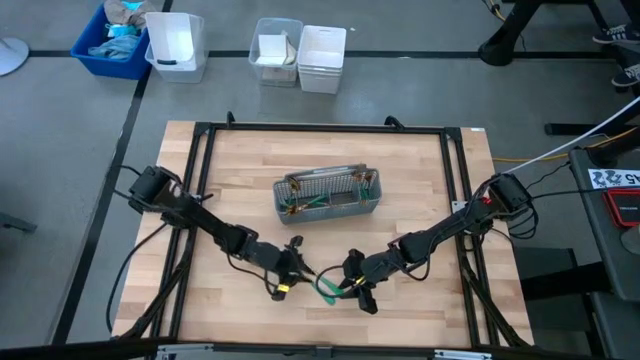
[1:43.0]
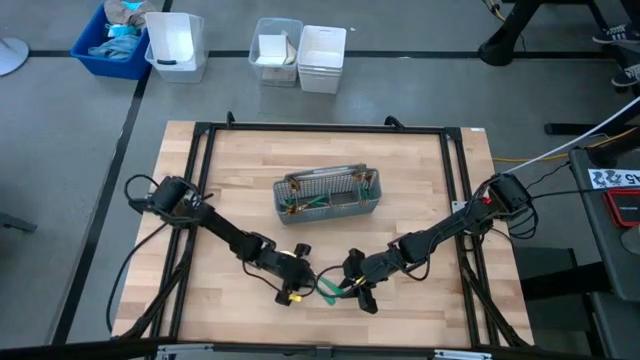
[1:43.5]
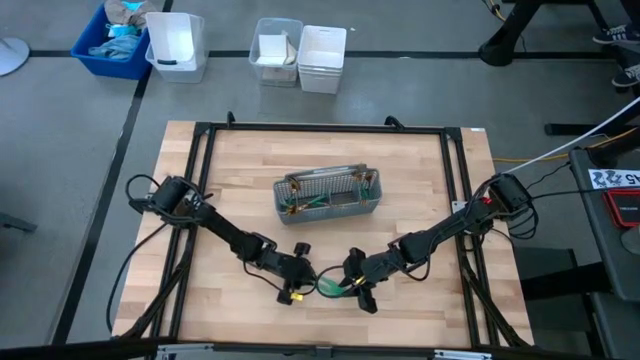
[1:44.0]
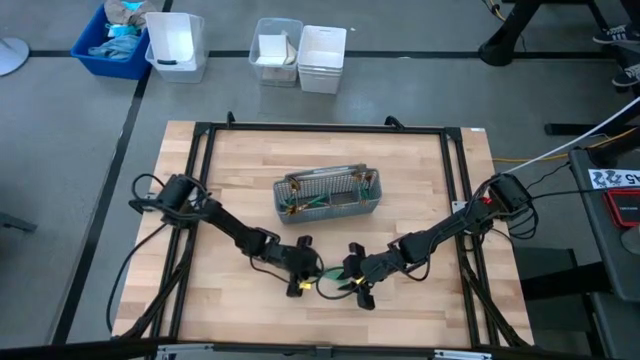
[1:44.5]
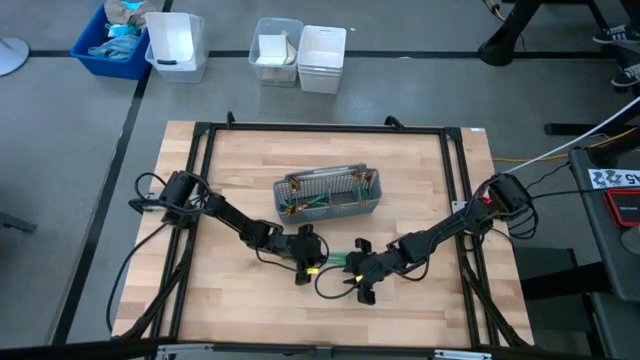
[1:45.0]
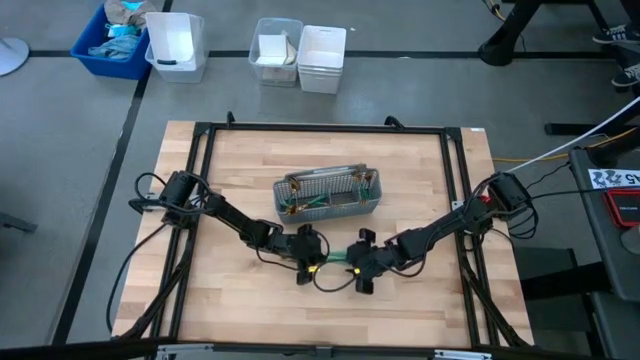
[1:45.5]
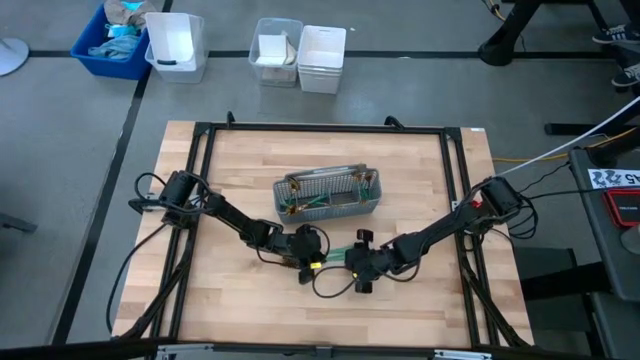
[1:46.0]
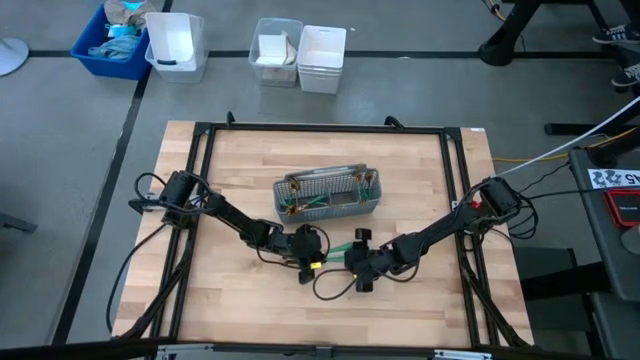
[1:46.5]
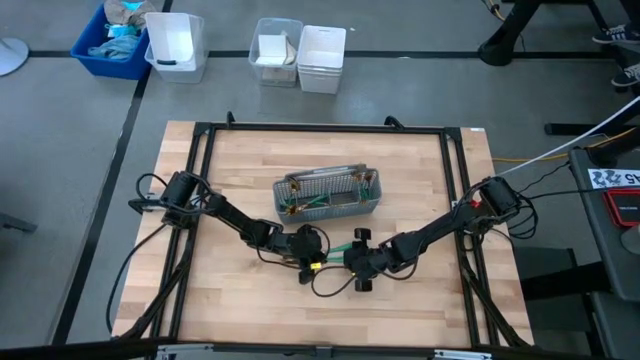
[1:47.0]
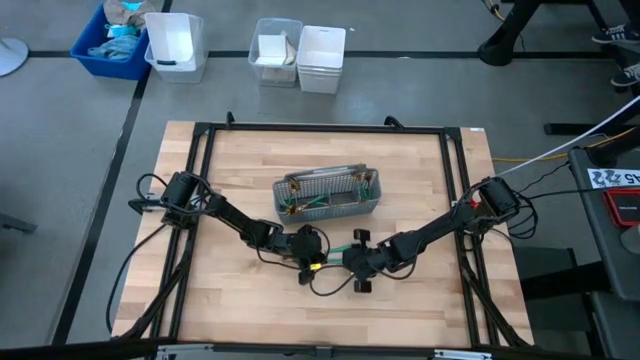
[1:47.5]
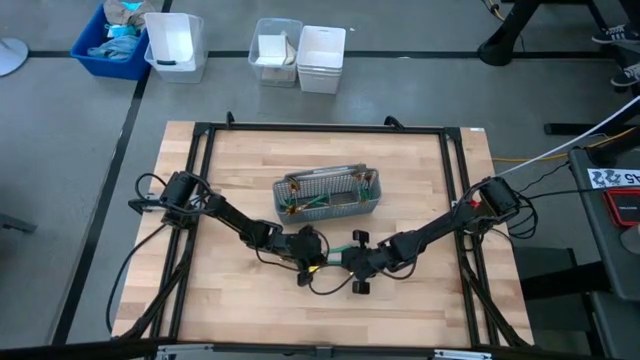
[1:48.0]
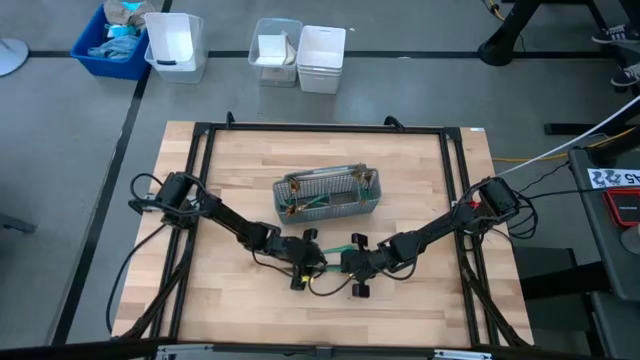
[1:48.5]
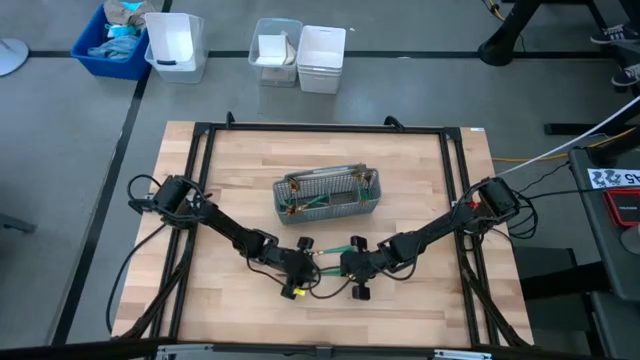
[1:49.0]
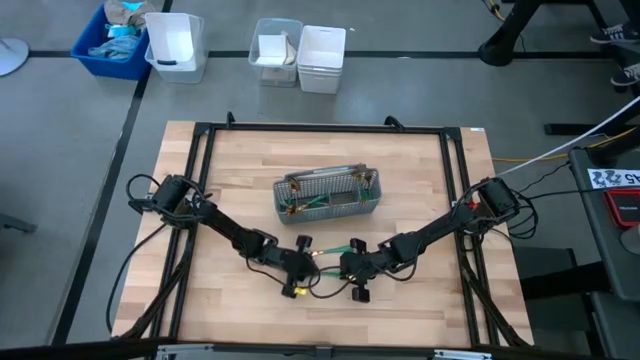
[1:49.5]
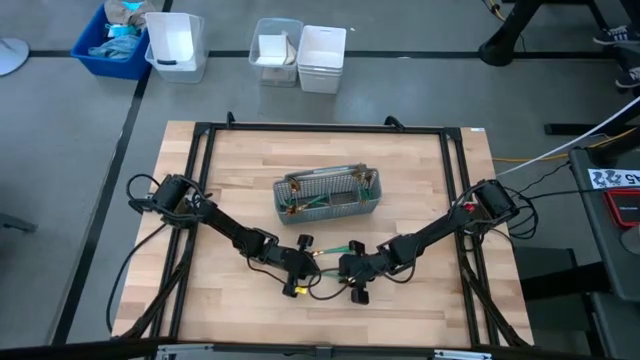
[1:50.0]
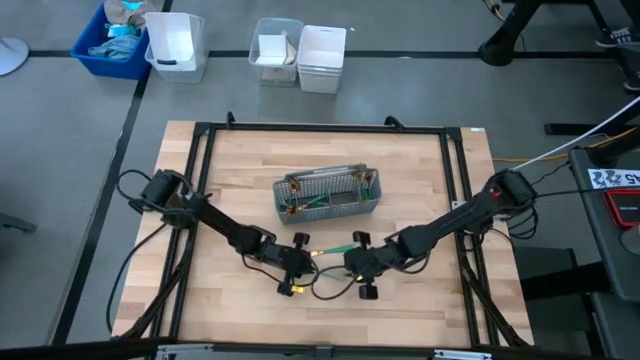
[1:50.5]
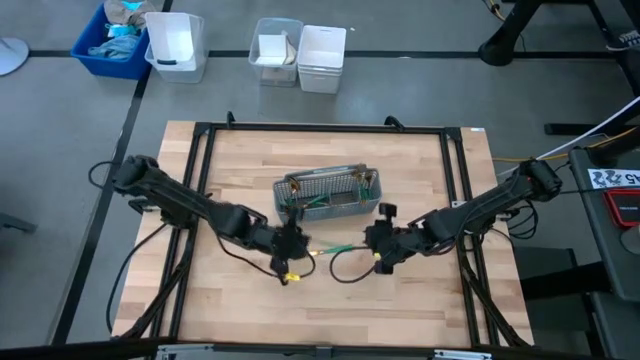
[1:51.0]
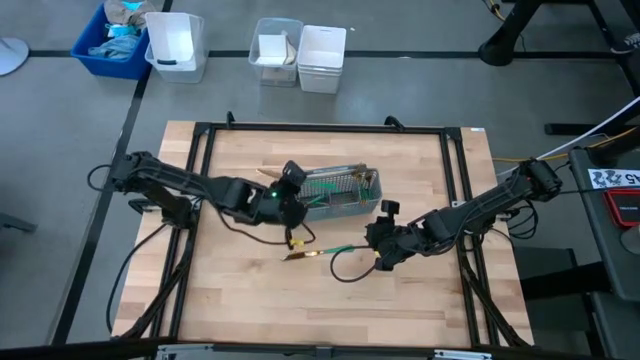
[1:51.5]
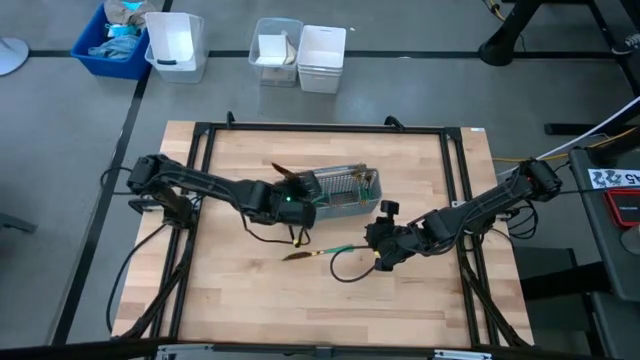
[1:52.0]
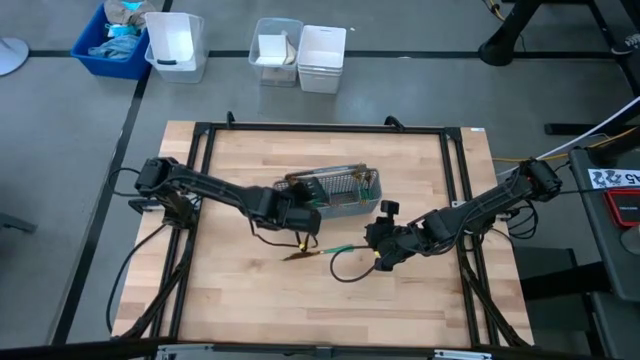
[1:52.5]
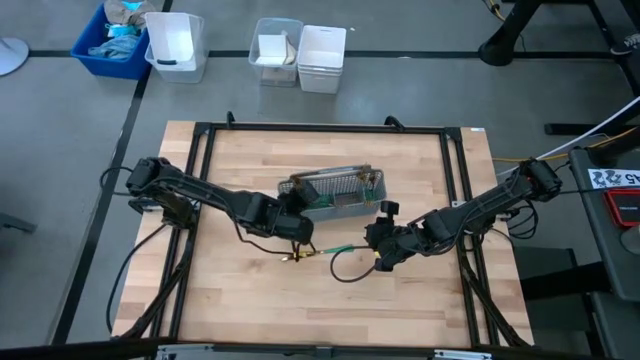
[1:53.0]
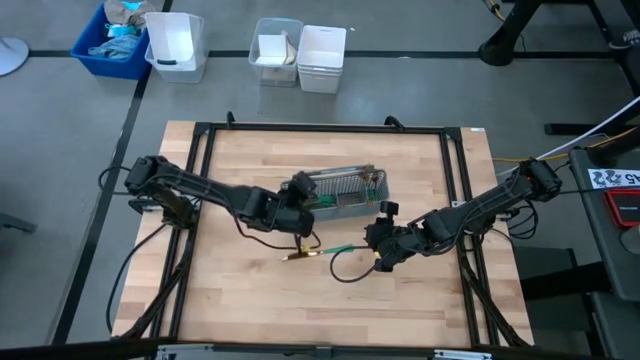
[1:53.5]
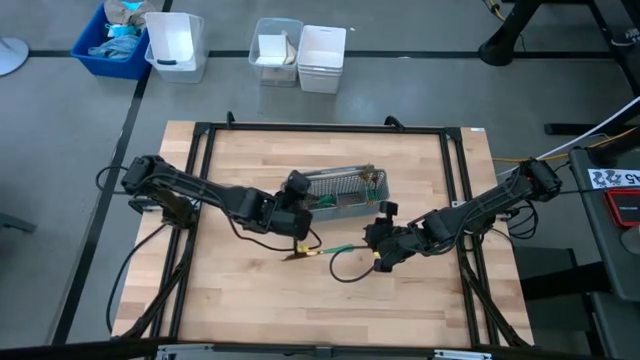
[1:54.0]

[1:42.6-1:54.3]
Task: Sort silverware
Put the green knife in the gray silverware basket

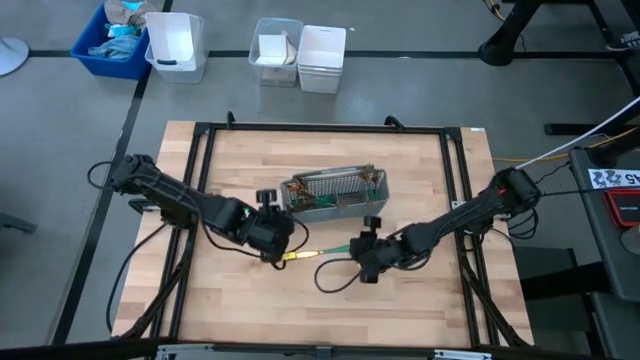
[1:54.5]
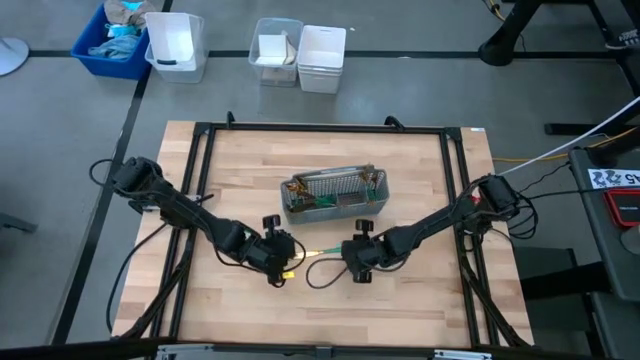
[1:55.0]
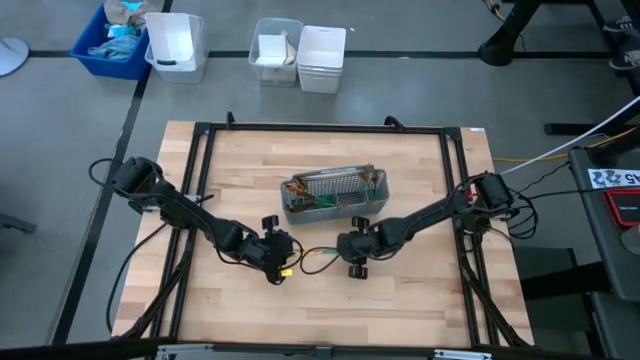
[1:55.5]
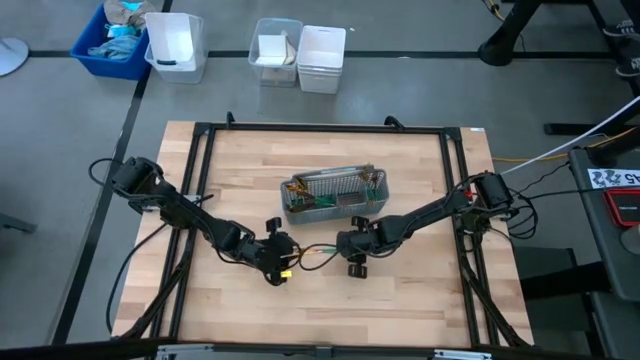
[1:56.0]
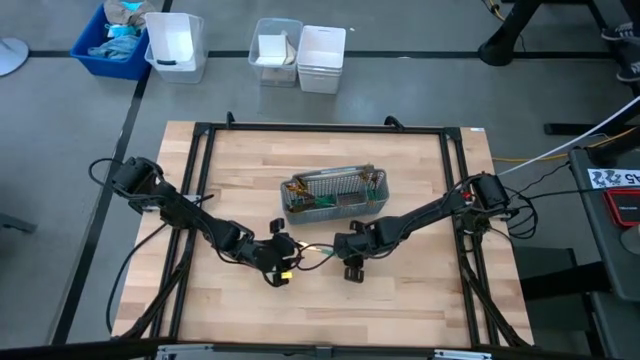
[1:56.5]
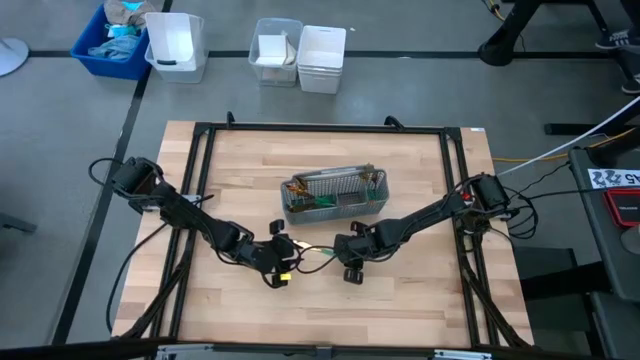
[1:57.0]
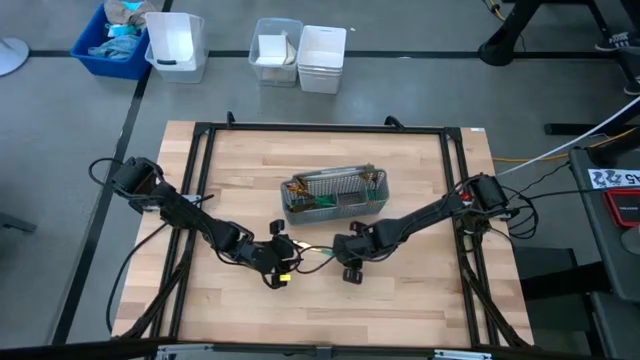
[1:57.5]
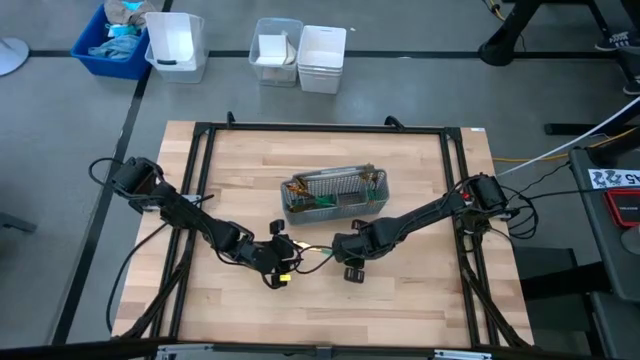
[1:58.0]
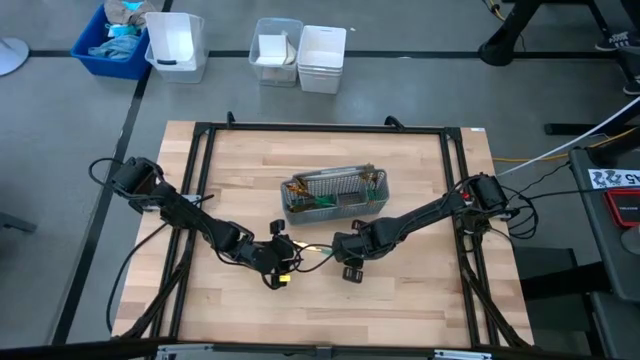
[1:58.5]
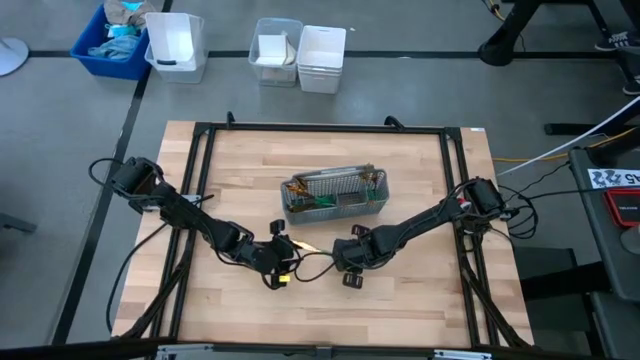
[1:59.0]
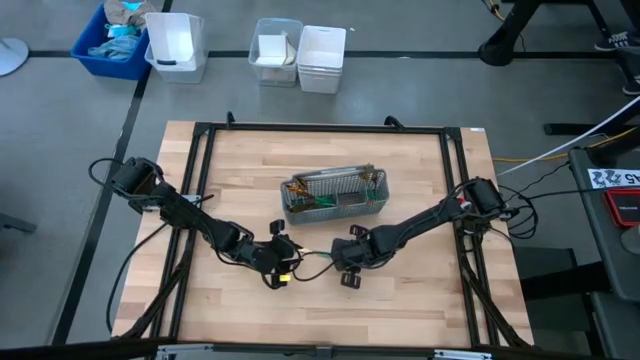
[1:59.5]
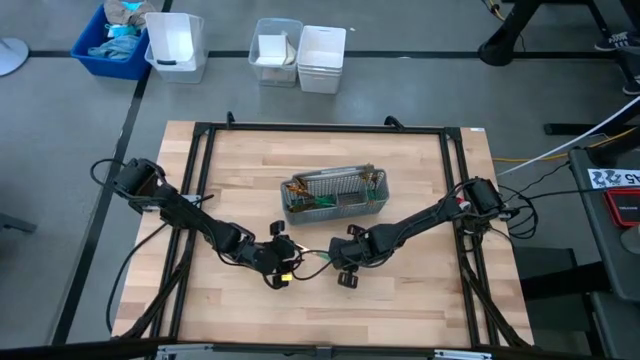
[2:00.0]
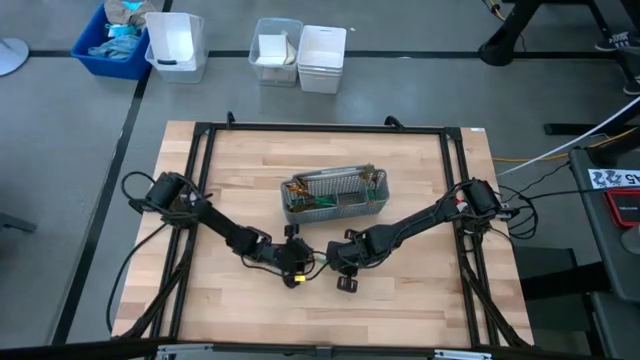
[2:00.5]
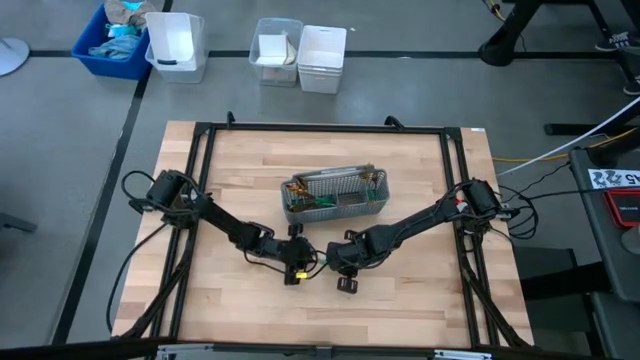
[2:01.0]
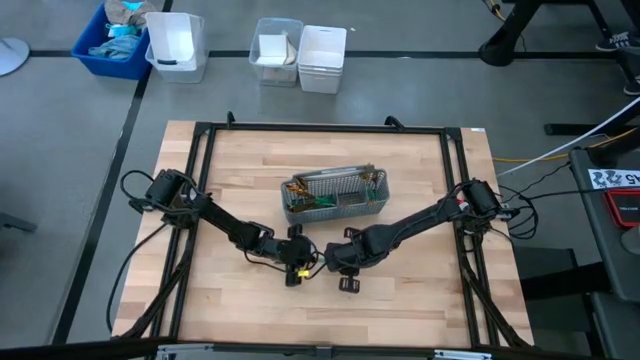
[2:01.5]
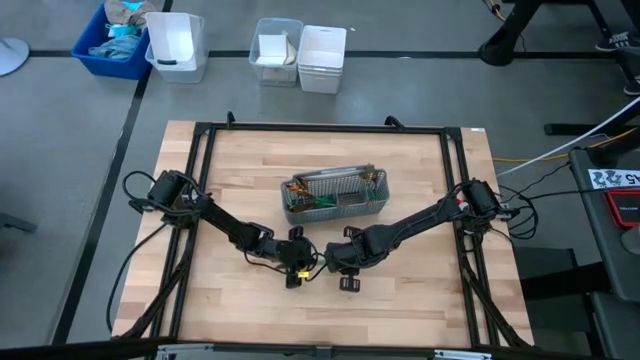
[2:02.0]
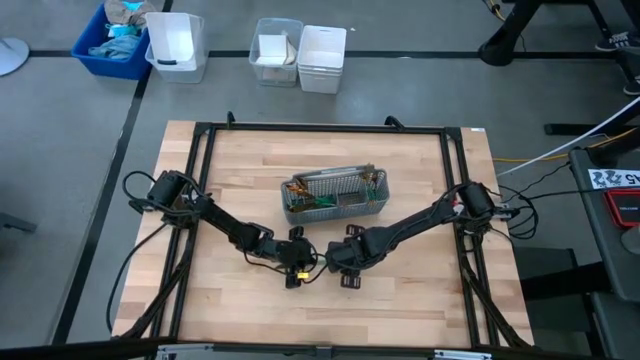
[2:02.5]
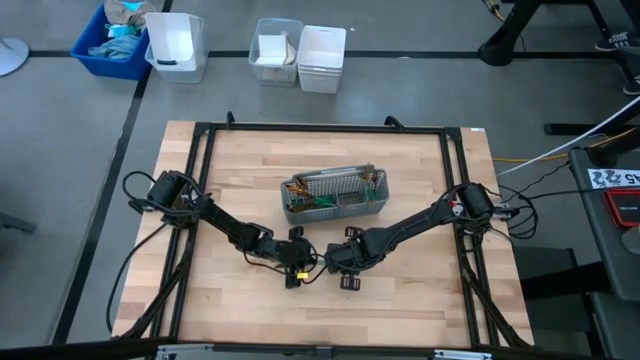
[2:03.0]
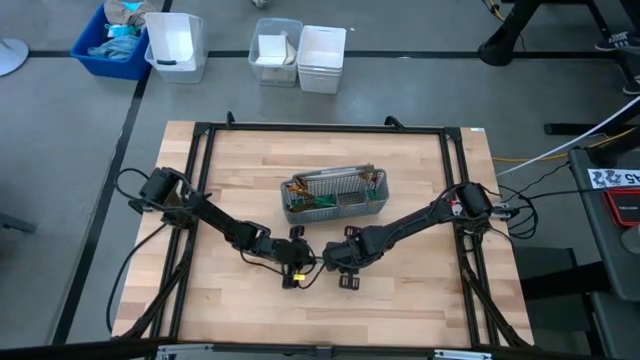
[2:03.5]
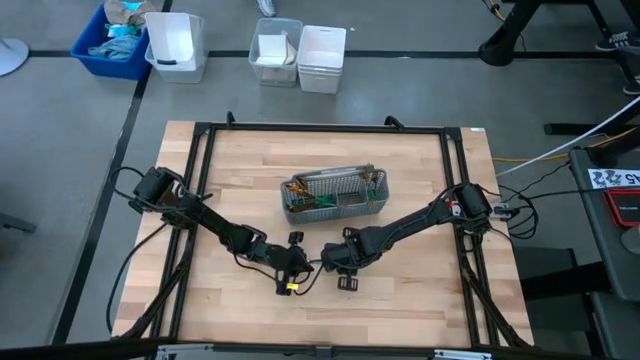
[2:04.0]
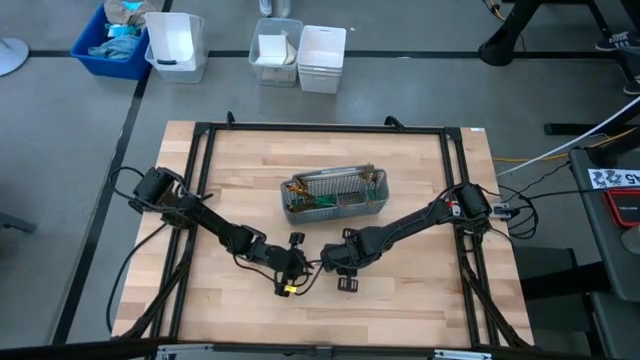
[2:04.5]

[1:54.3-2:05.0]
Put the green knife in the gray silverware basket
